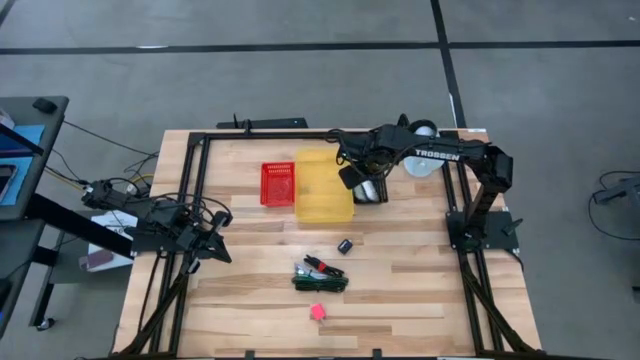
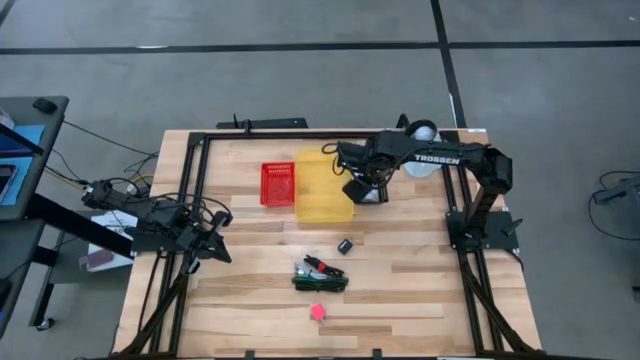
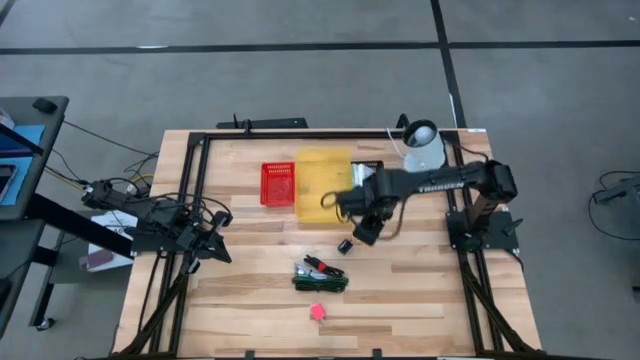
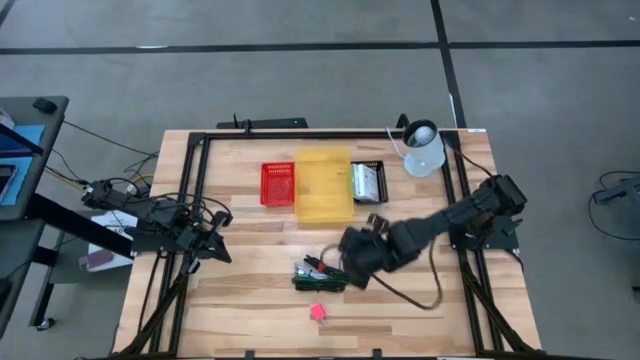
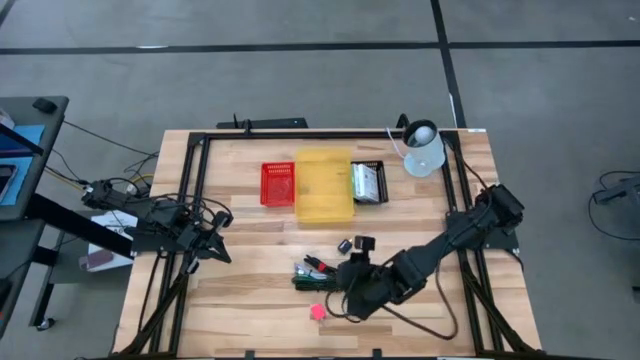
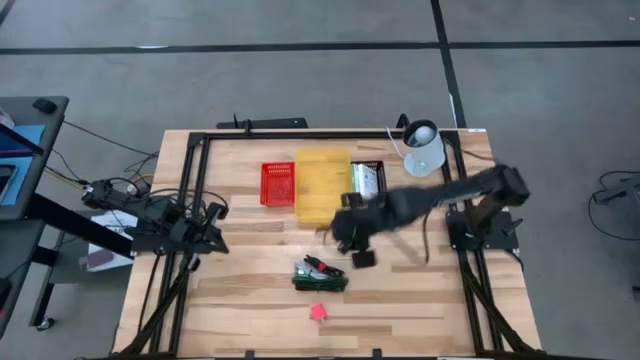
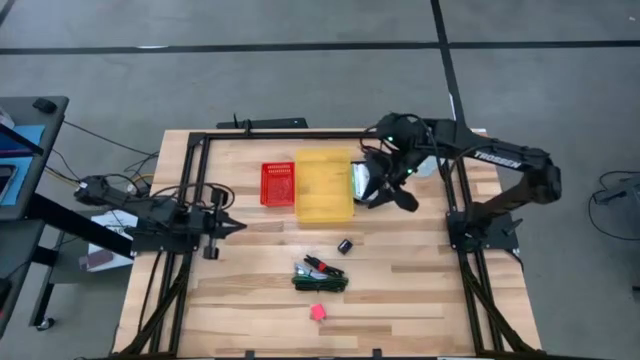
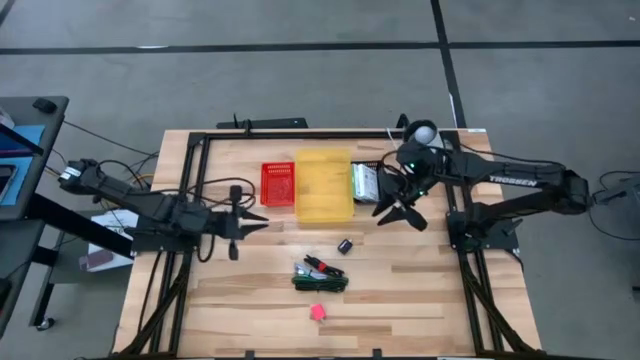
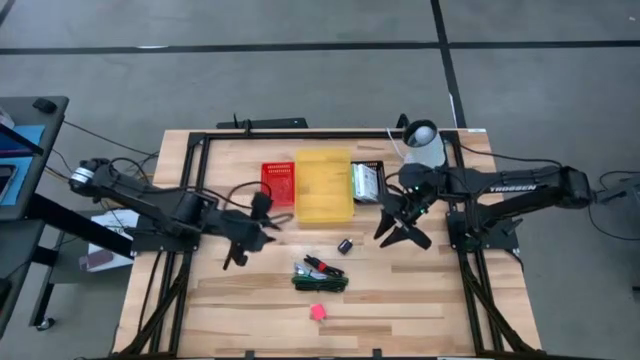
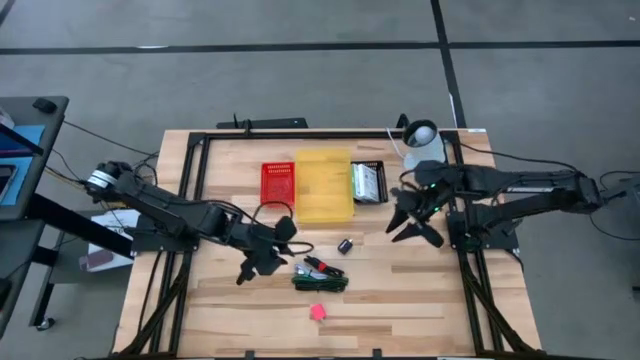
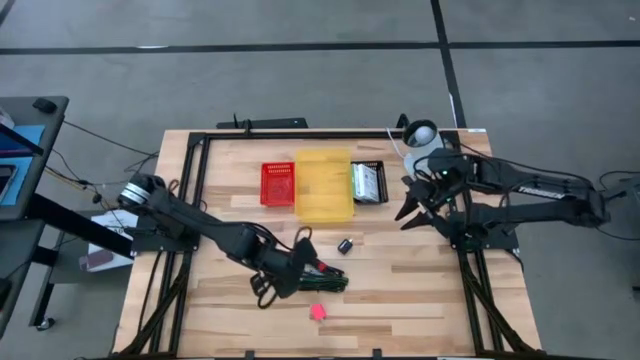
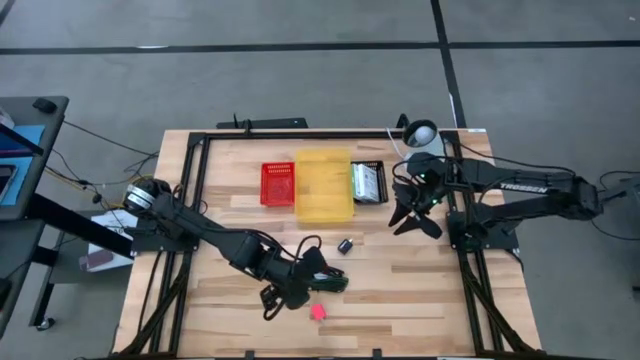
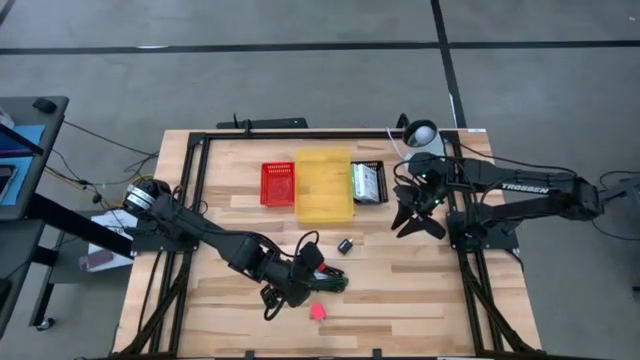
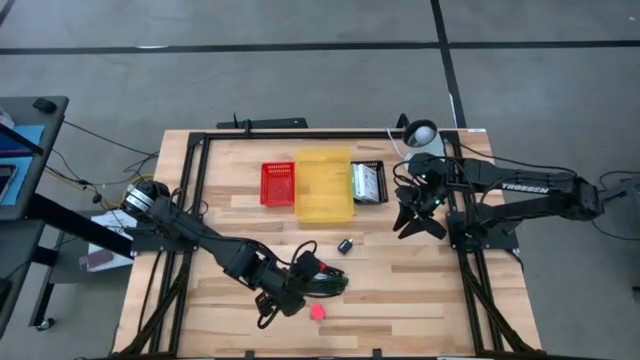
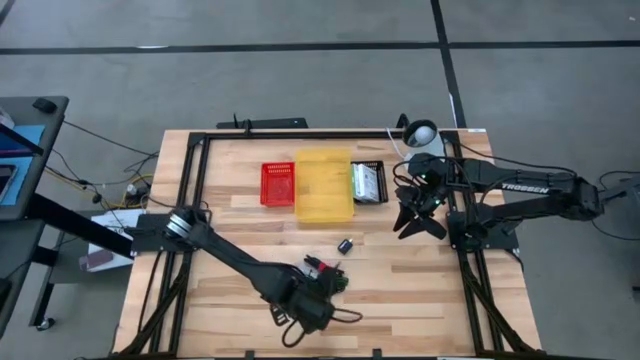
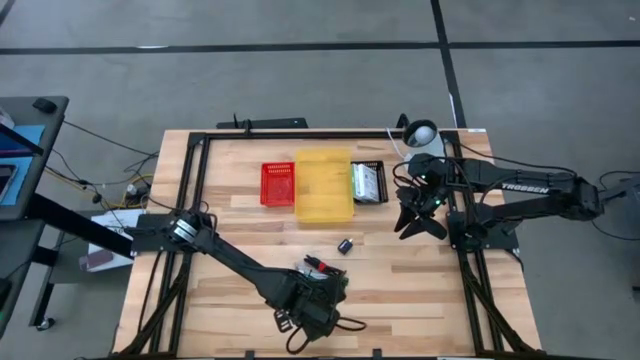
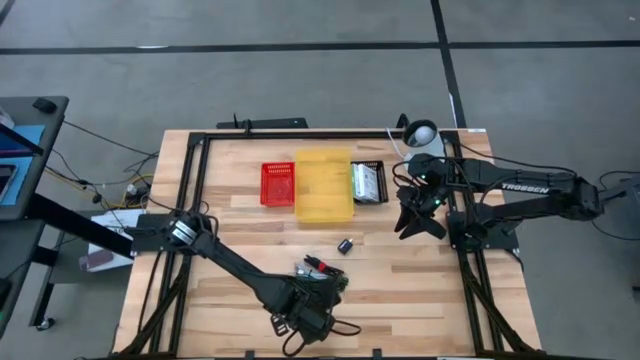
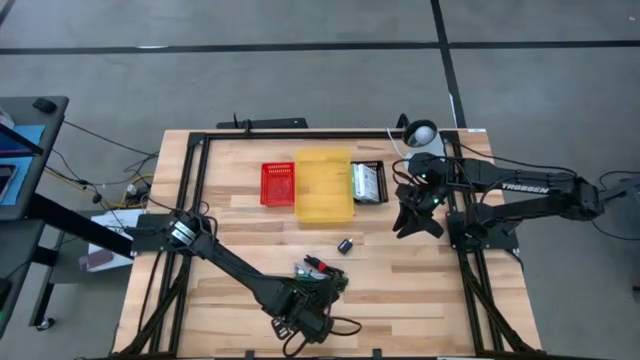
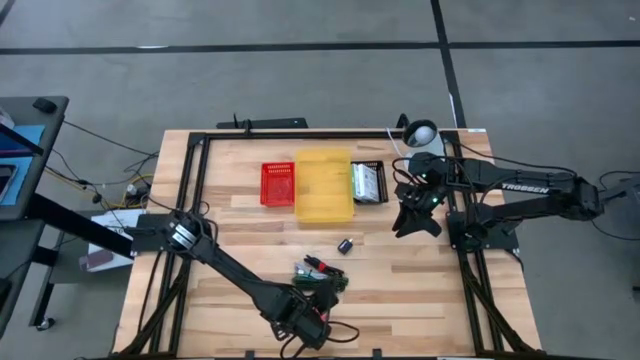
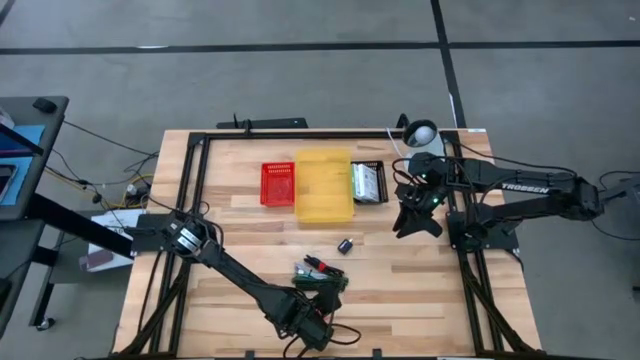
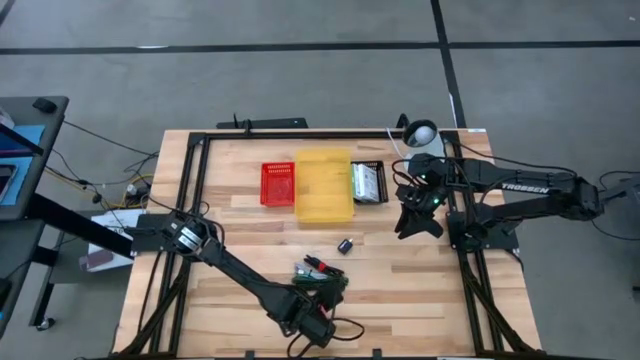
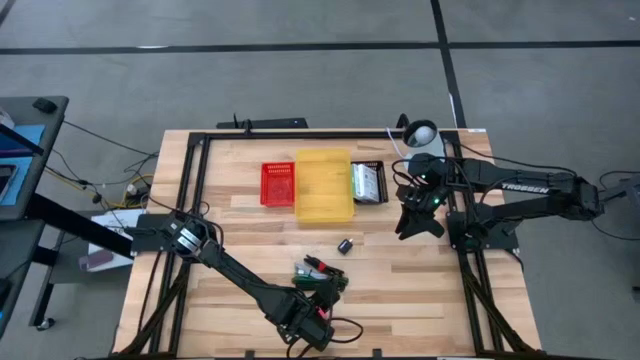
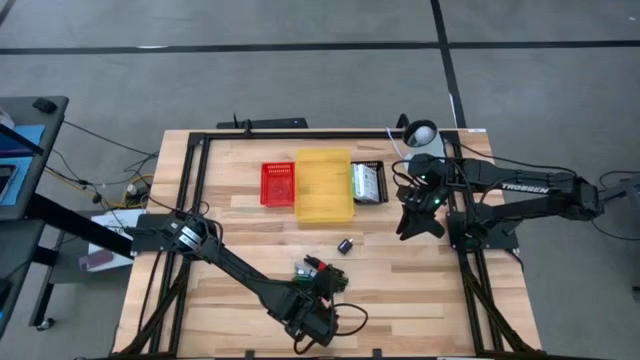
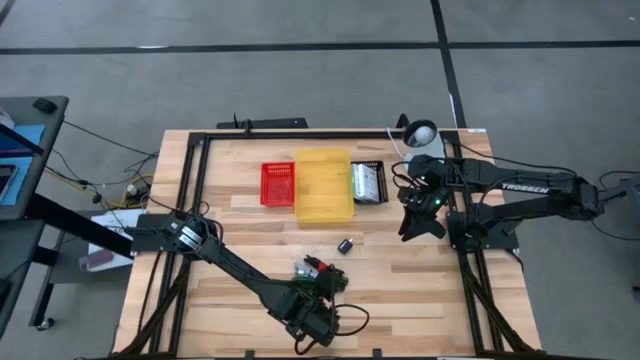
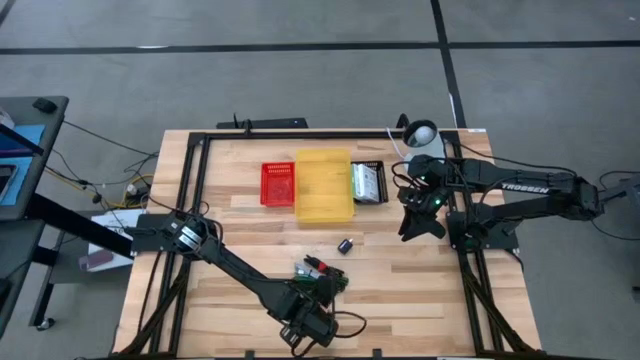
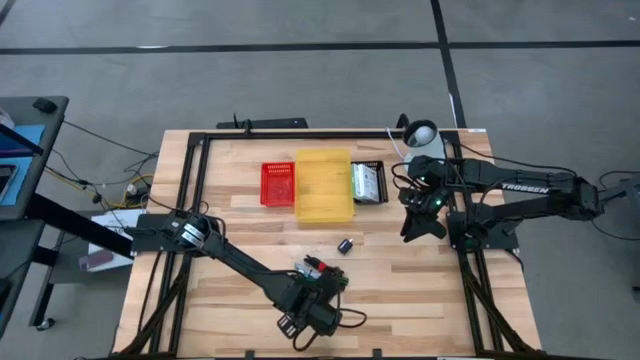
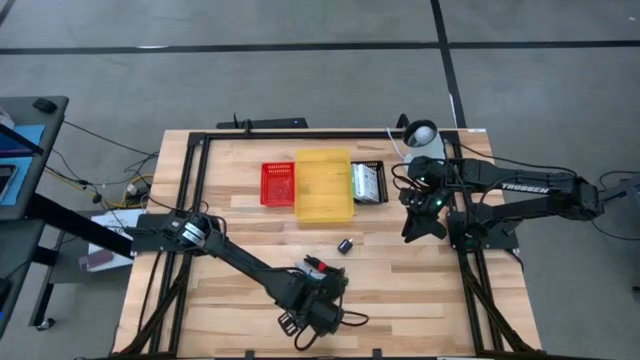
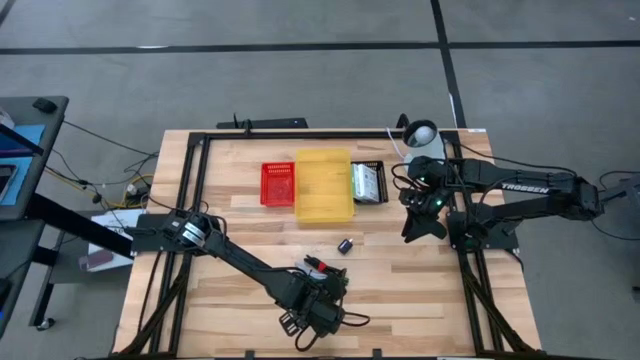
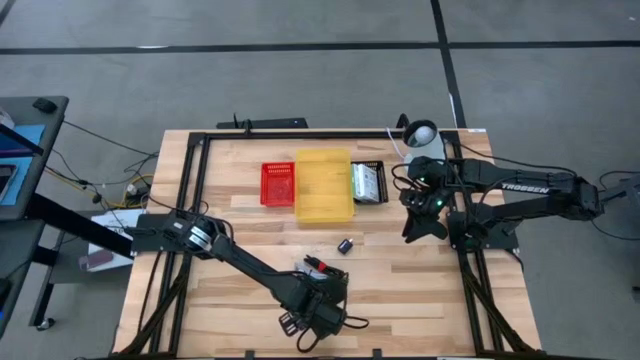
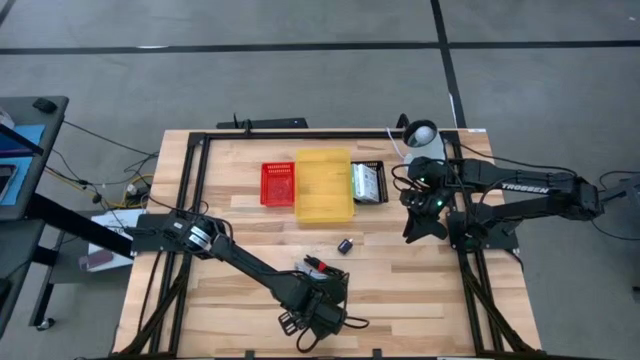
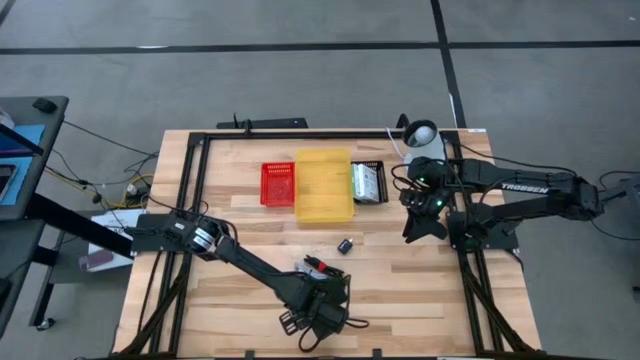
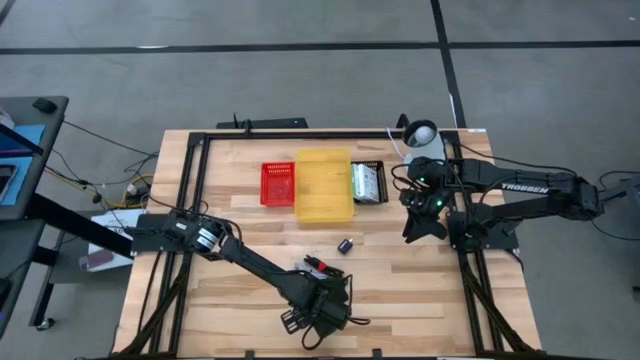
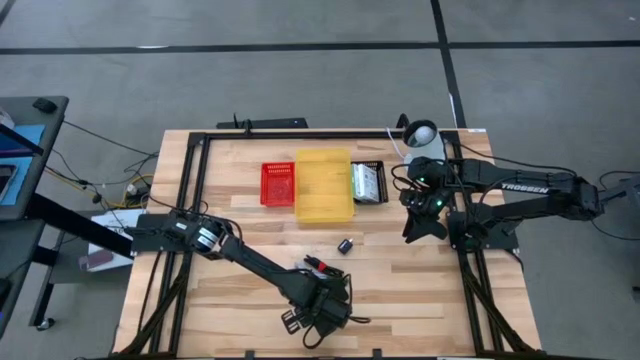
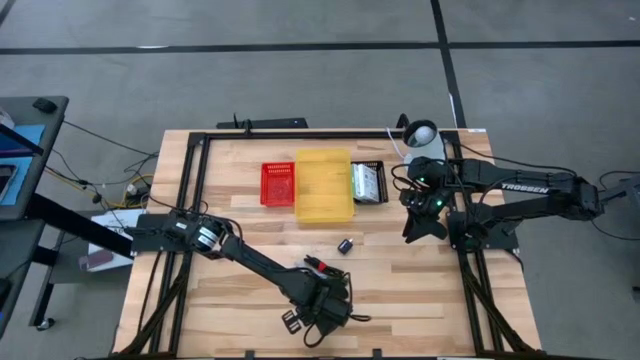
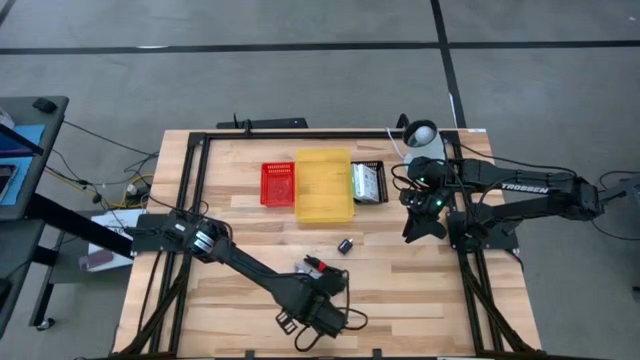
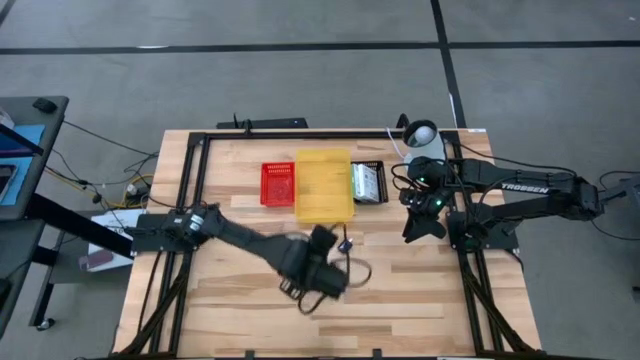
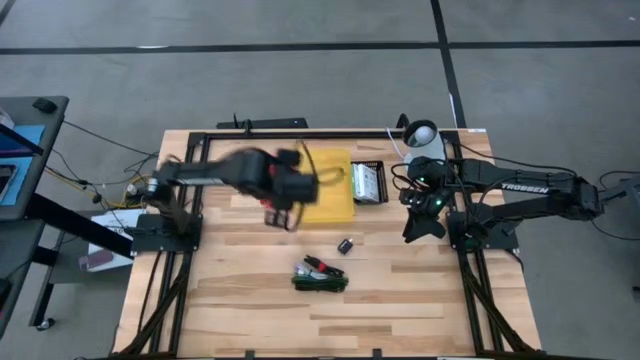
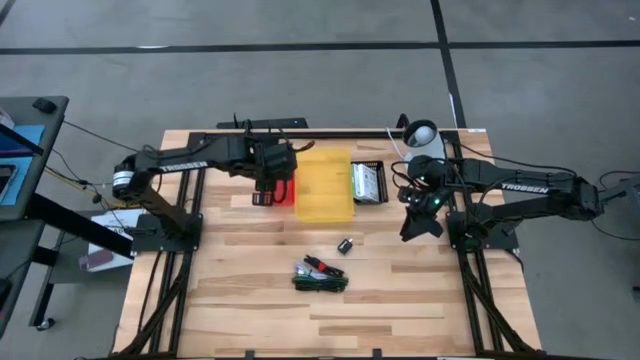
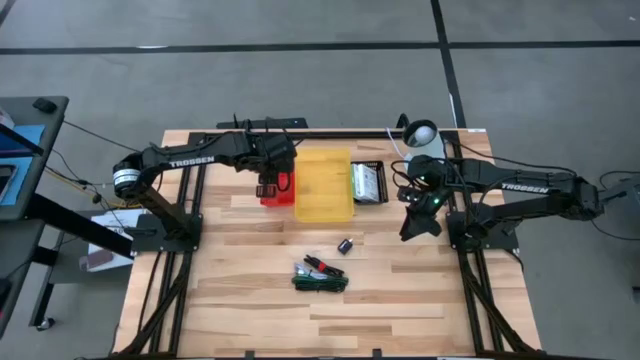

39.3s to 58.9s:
Task: Pick and place items into bin
Put the pink charger adapter into the red bin
